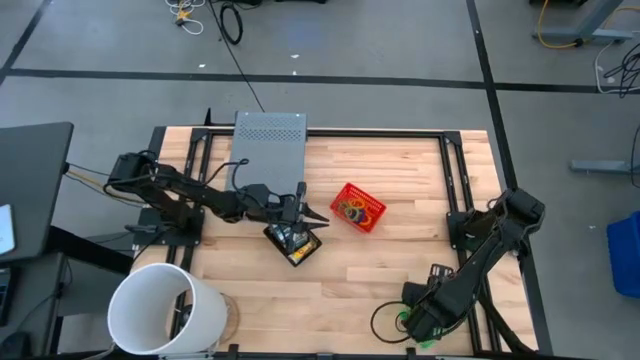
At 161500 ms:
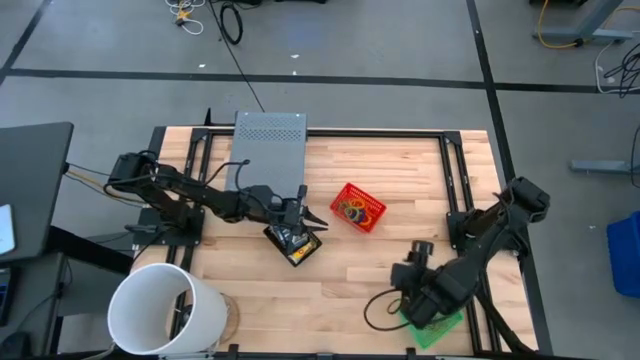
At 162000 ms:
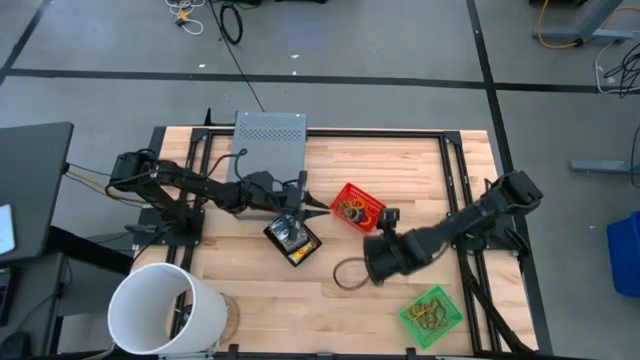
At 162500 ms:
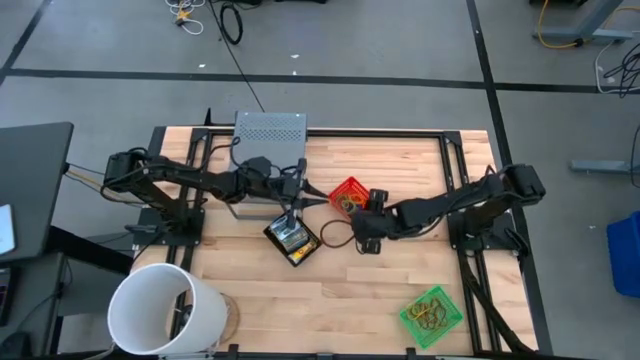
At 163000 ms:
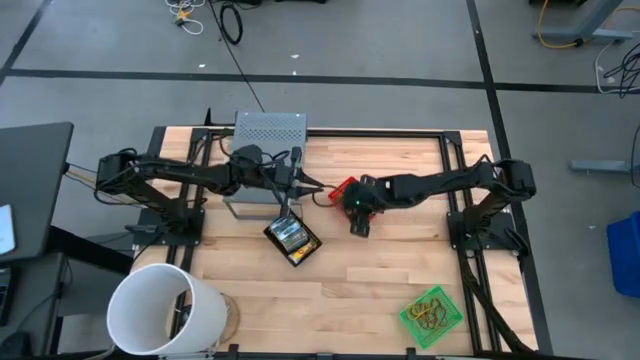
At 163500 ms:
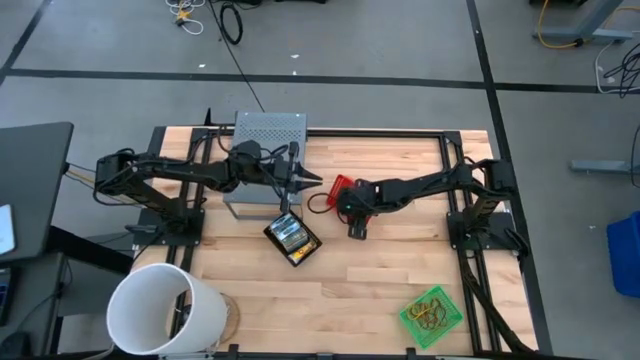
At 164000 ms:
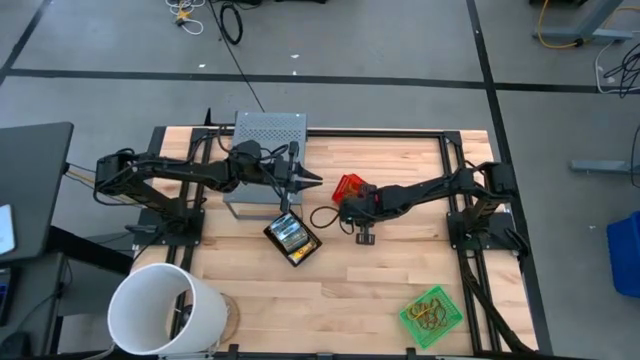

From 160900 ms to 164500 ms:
Task: Pick & Place Office Desk Supplies
Put the red basket with the spring keychain on the shelf

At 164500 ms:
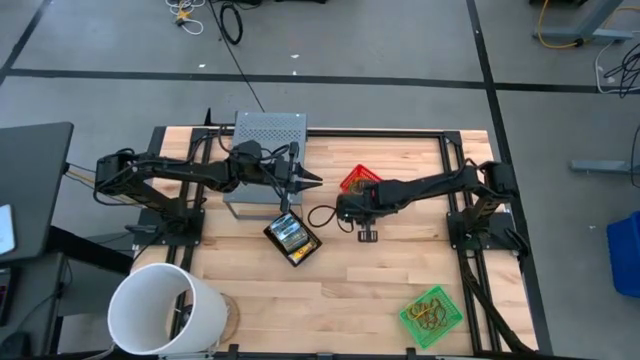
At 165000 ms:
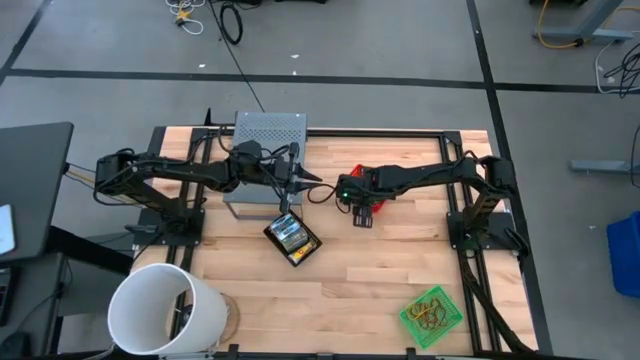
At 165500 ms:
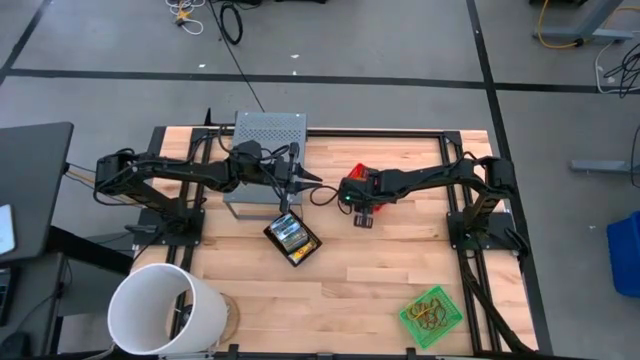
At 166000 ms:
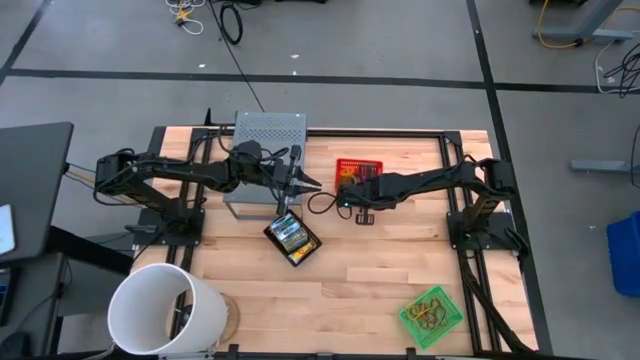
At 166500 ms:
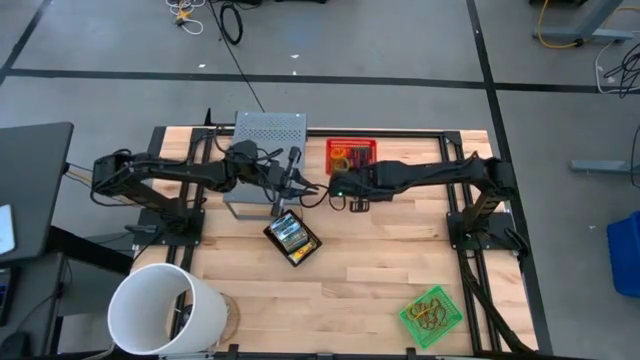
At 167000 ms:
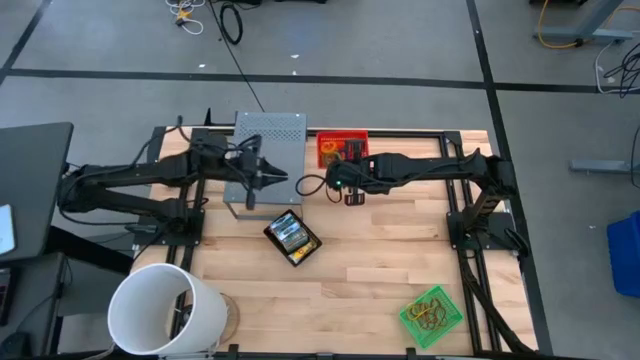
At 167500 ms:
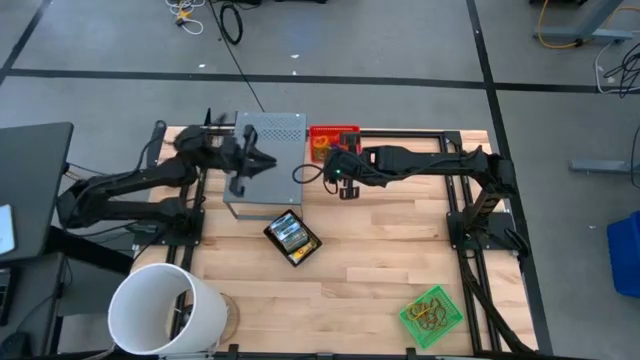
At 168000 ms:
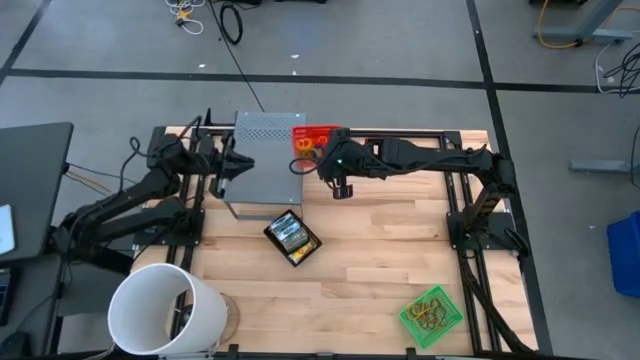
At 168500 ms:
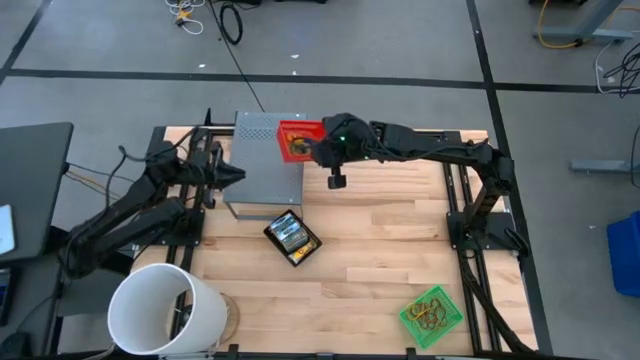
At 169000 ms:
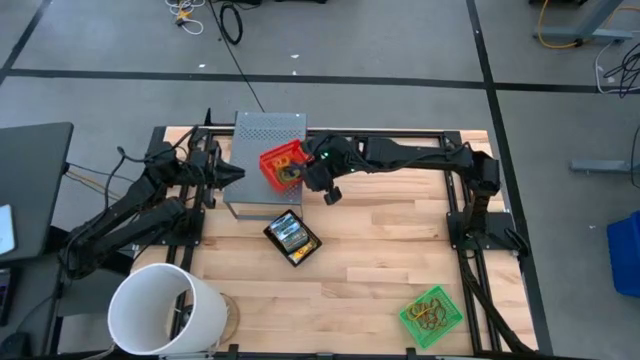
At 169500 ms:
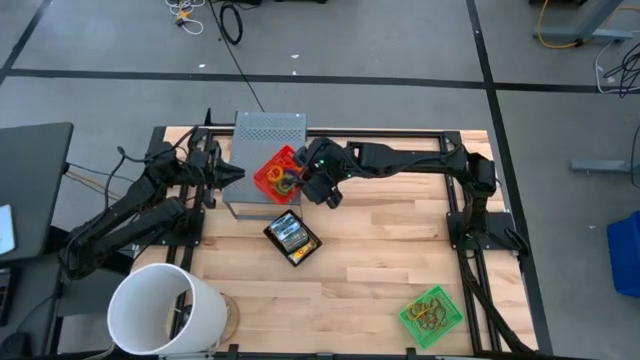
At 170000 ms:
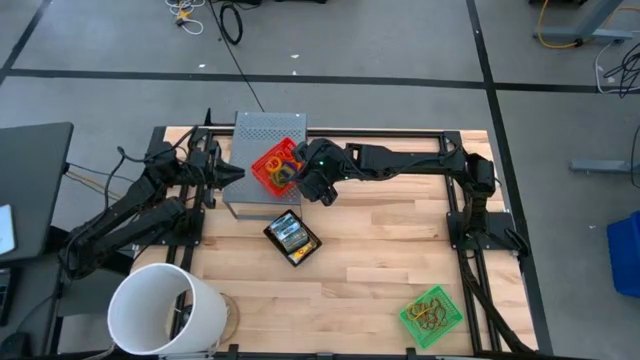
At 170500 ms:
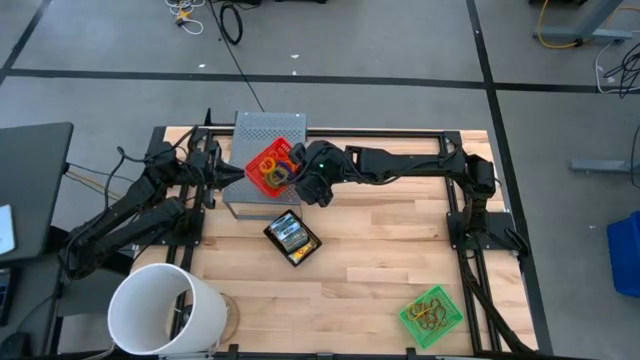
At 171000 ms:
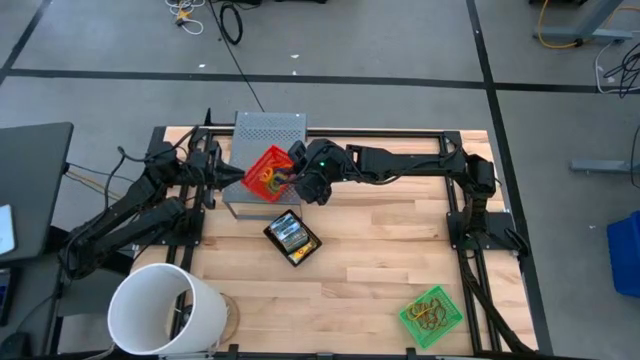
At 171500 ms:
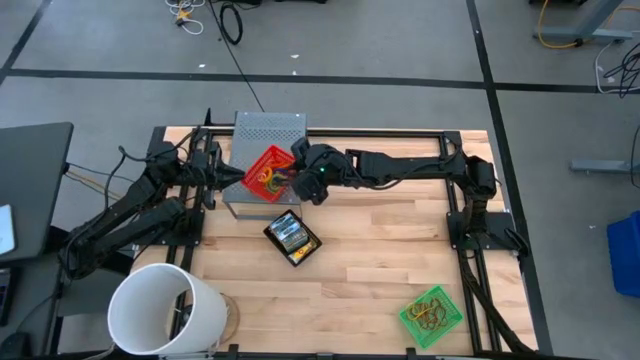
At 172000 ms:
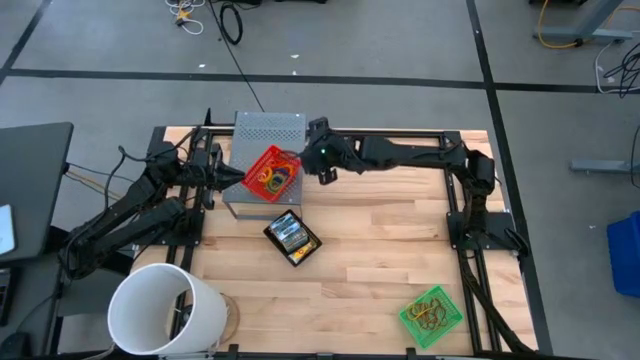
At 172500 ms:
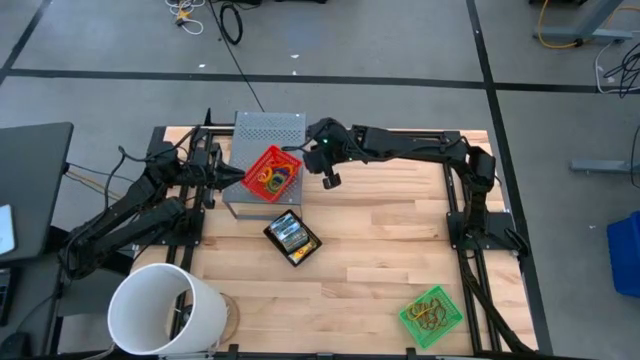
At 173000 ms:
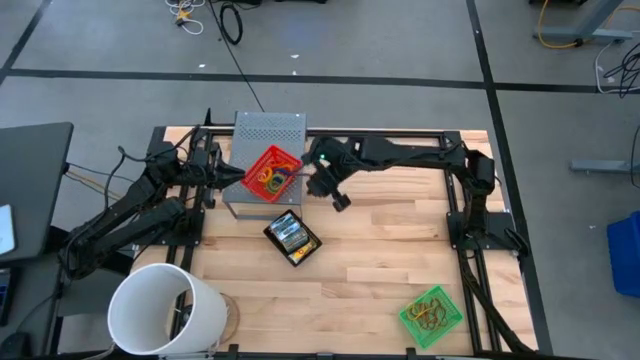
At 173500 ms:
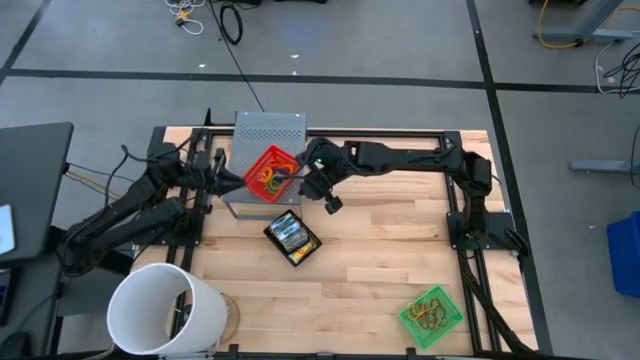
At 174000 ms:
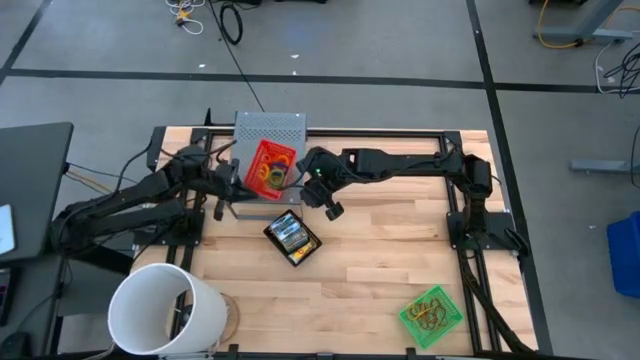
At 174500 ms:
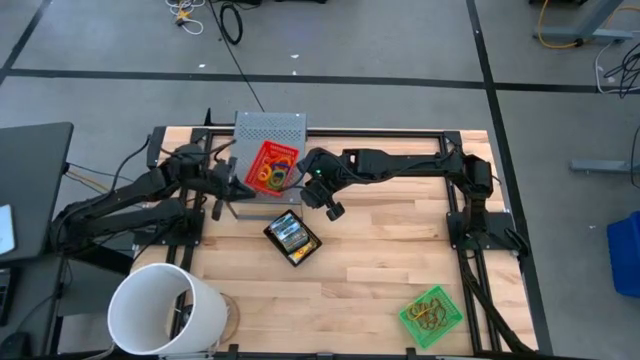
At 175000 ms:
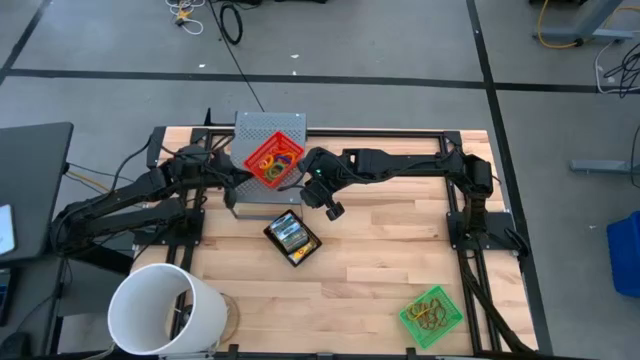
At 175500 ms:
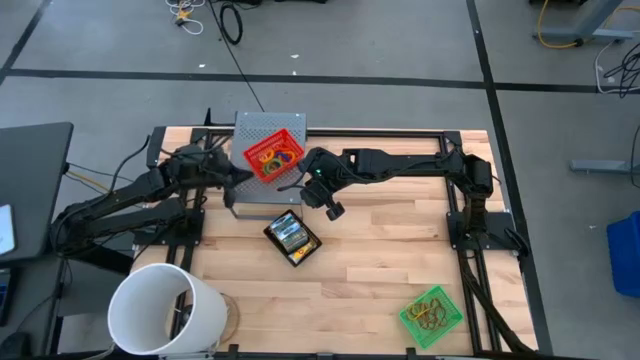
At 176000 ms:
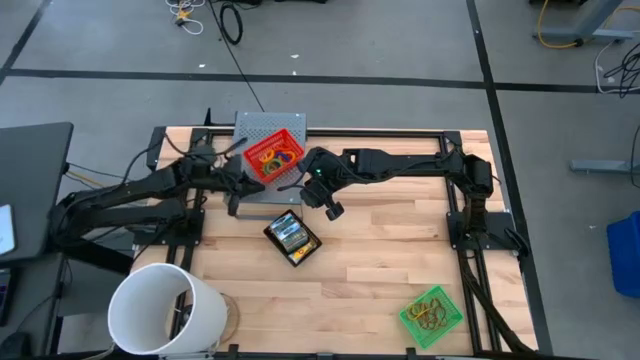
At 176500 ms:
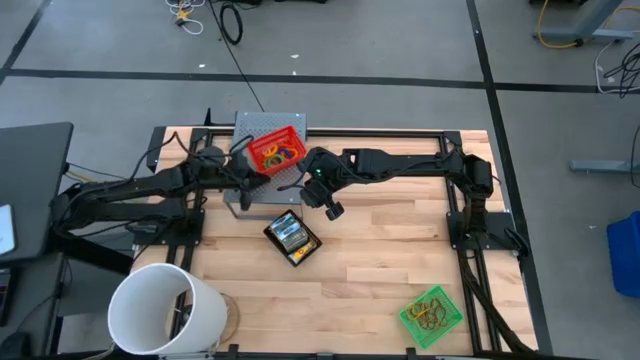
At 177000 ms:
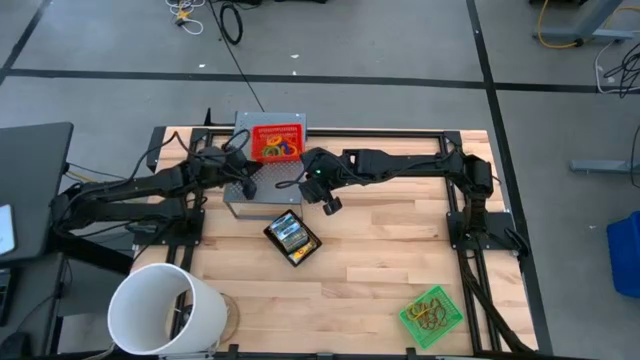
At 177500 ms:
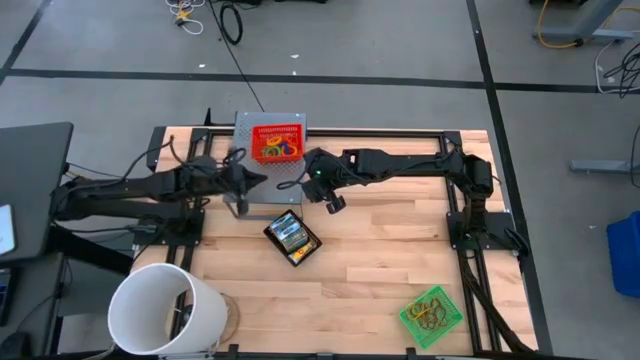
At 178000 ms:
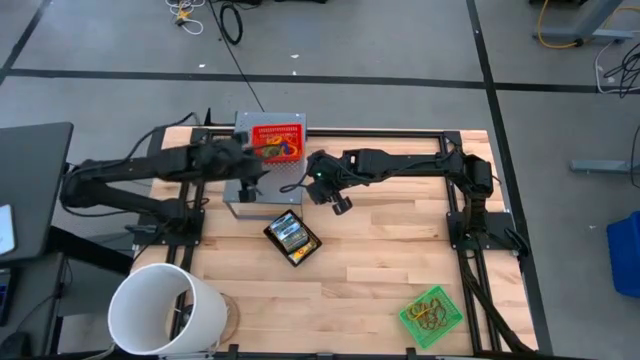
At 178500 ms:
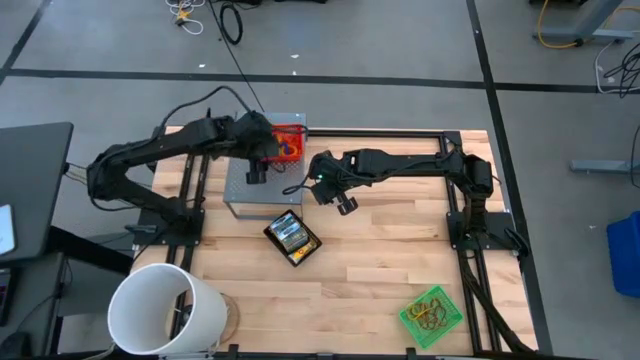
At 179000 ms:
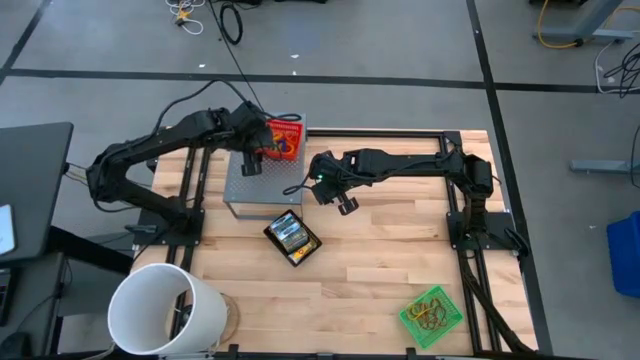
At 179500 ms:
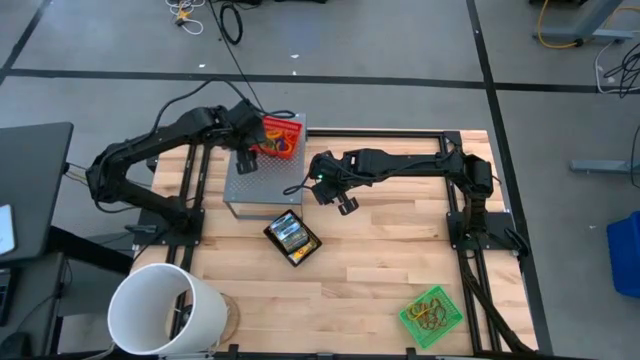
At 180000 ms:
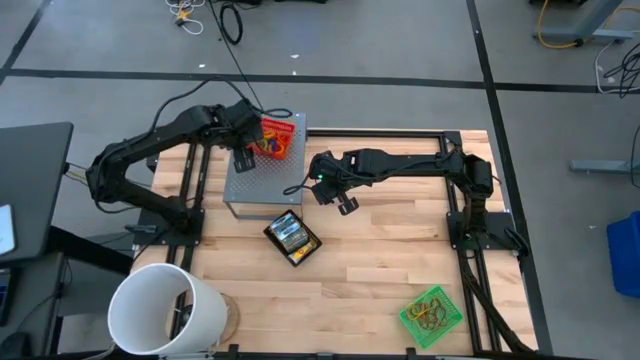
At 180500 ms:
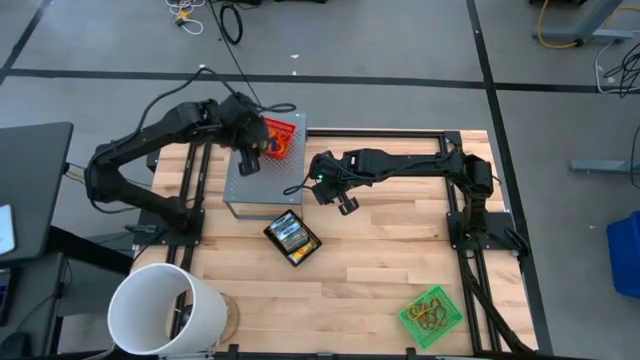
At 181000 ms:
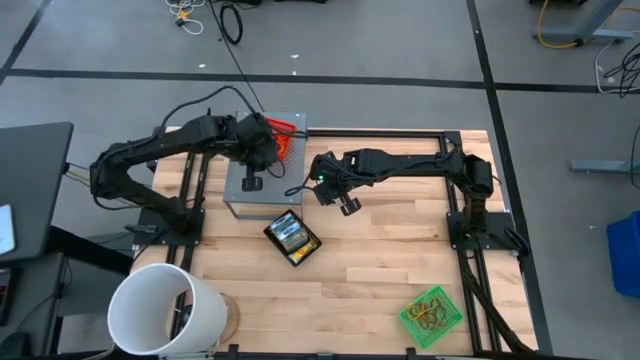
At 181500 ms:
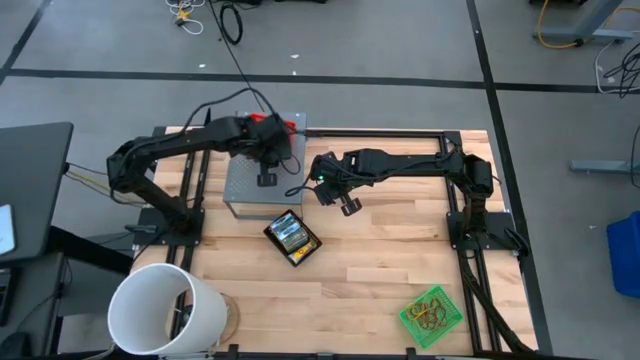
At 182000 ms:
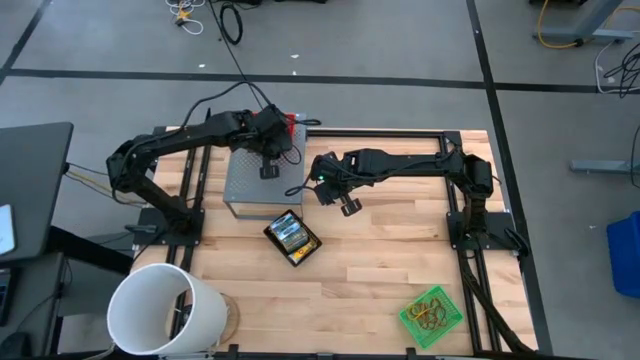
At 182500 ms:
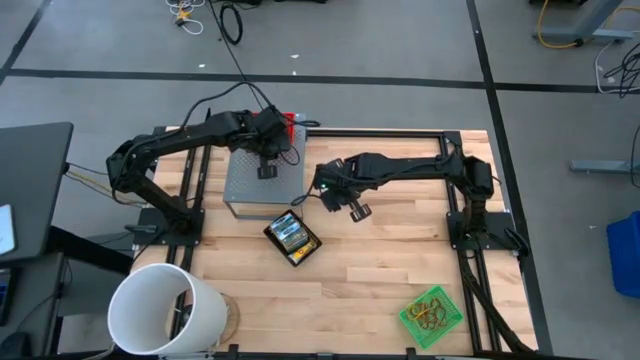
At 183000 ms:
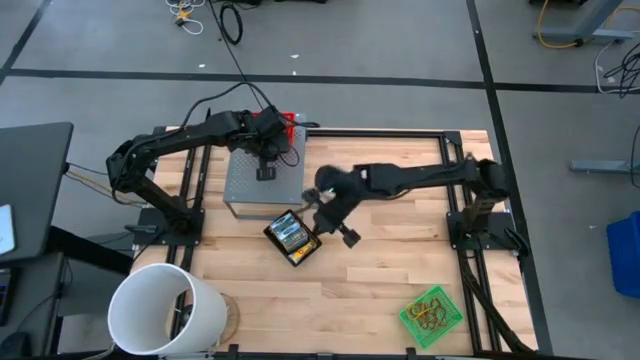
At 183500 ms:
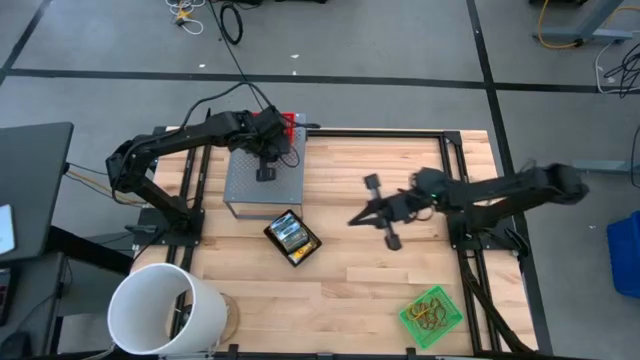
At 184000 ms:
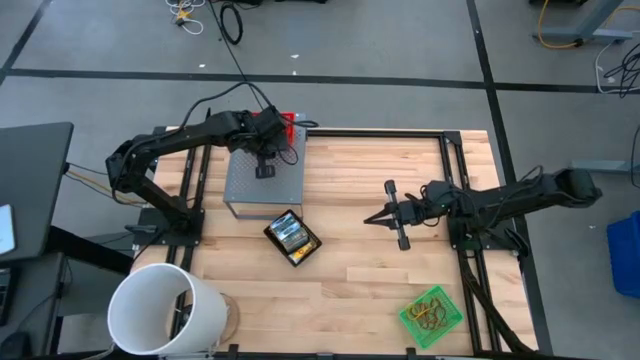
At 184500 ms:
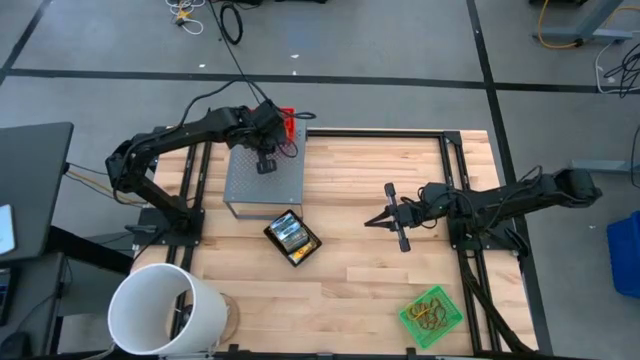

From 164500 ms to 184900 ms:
Put the red basket with the spring rubber bands on the shelf
